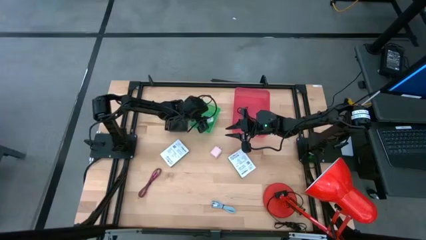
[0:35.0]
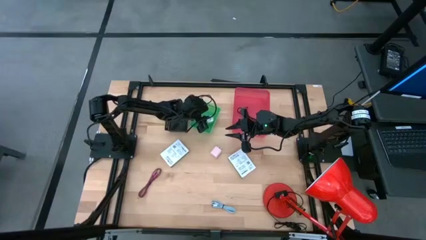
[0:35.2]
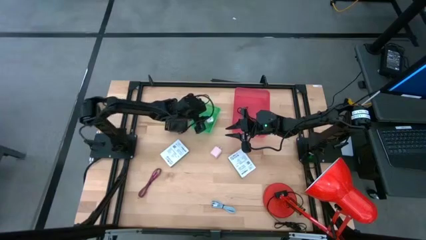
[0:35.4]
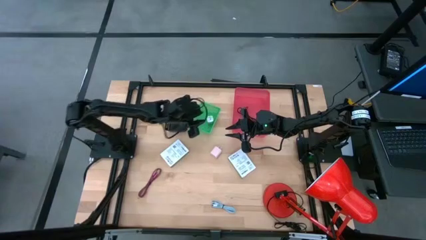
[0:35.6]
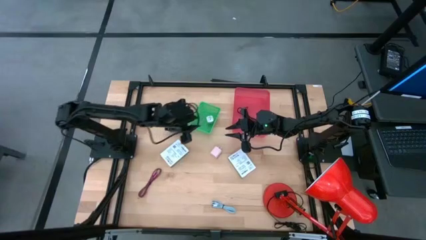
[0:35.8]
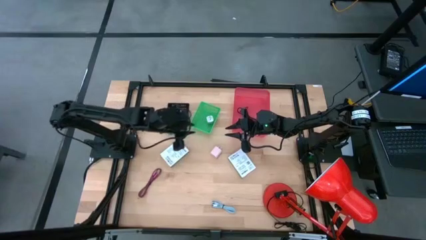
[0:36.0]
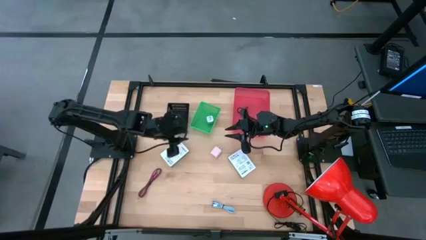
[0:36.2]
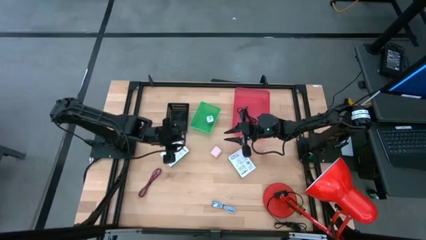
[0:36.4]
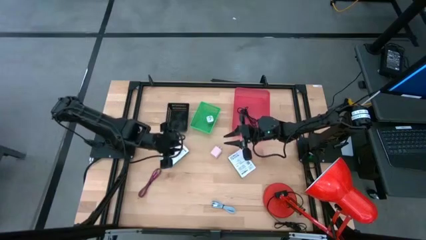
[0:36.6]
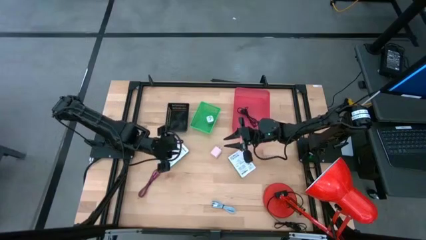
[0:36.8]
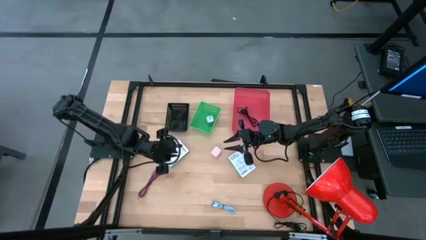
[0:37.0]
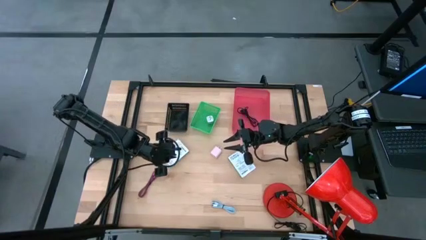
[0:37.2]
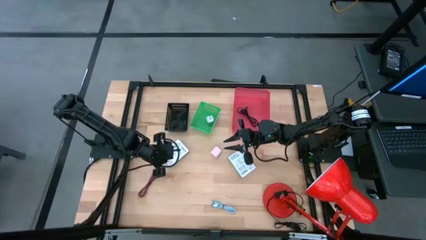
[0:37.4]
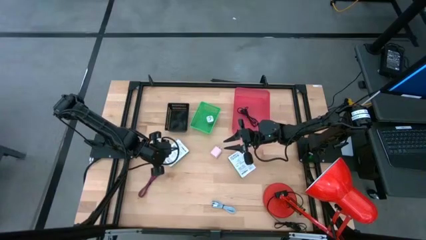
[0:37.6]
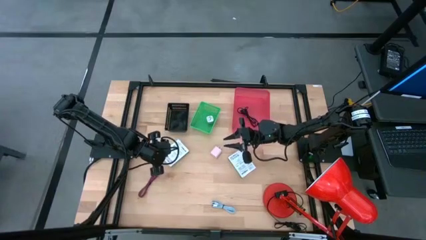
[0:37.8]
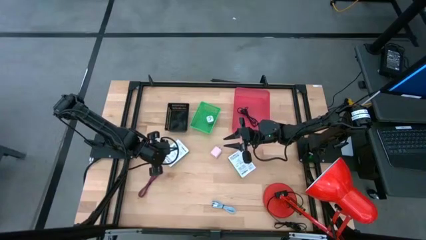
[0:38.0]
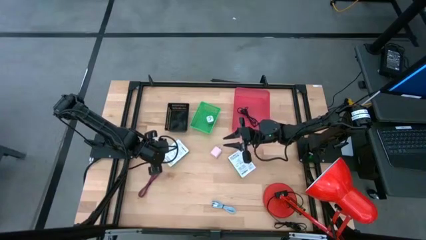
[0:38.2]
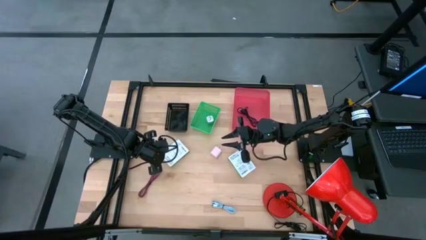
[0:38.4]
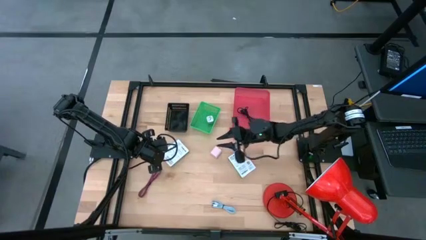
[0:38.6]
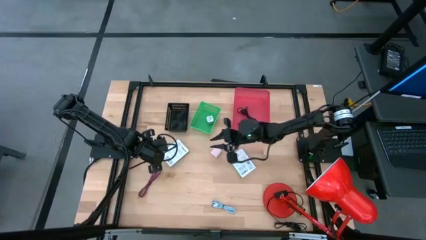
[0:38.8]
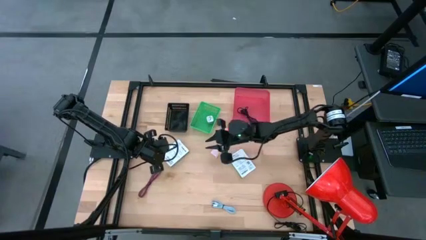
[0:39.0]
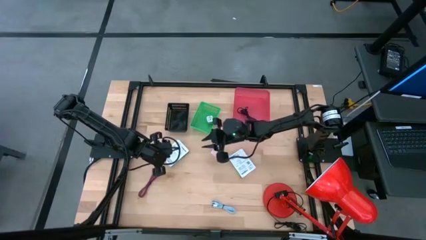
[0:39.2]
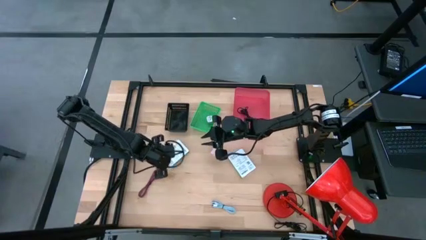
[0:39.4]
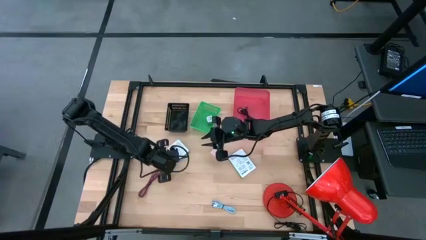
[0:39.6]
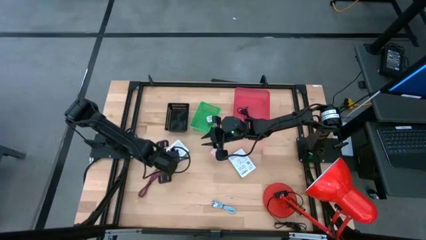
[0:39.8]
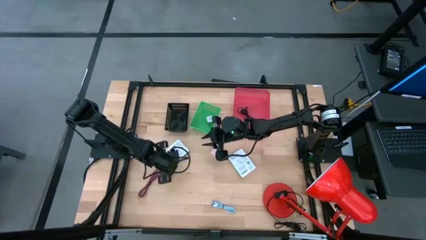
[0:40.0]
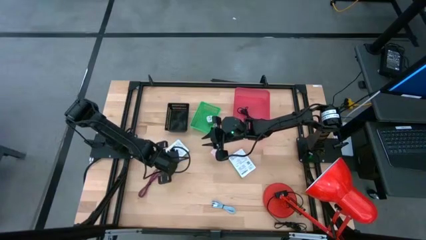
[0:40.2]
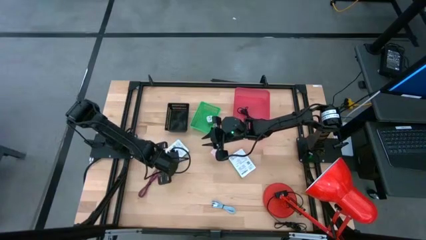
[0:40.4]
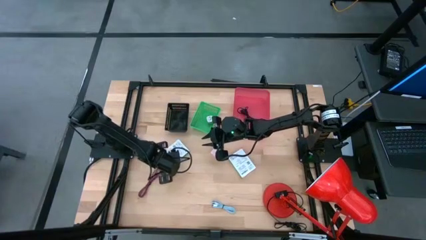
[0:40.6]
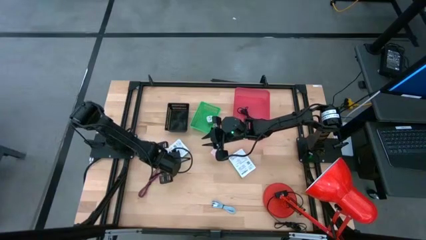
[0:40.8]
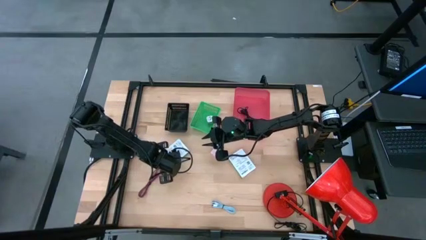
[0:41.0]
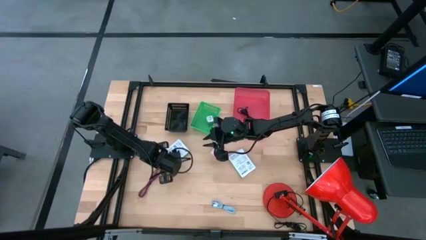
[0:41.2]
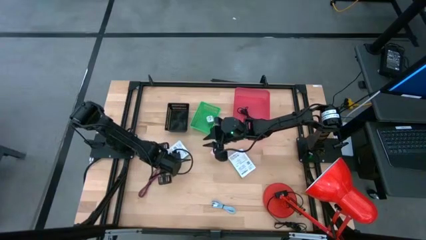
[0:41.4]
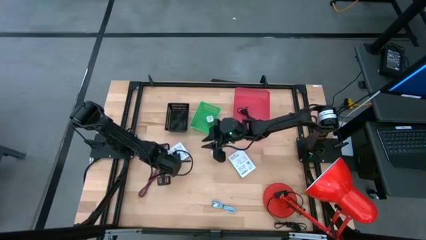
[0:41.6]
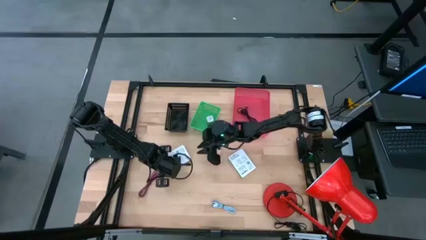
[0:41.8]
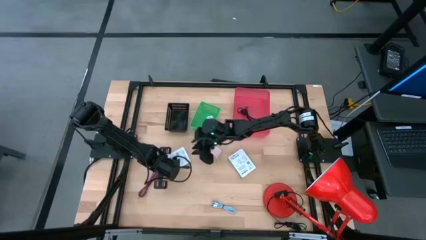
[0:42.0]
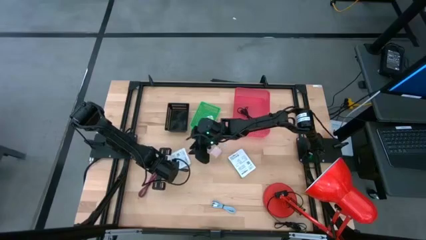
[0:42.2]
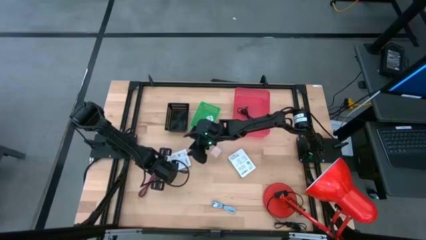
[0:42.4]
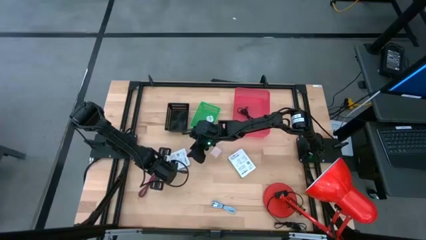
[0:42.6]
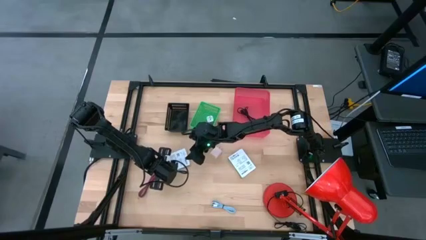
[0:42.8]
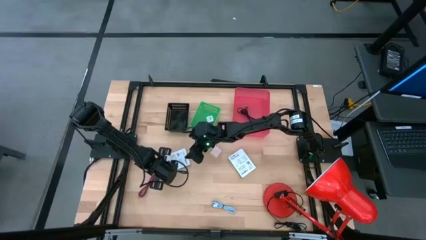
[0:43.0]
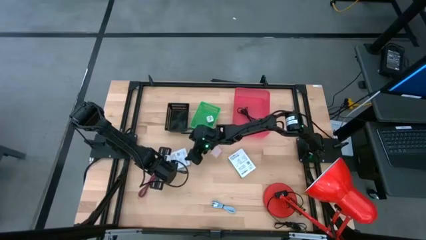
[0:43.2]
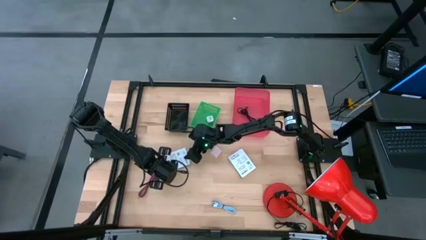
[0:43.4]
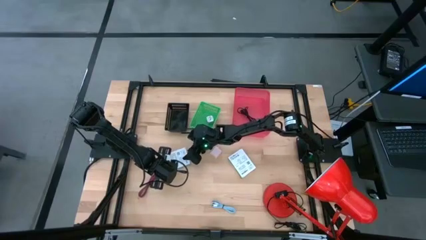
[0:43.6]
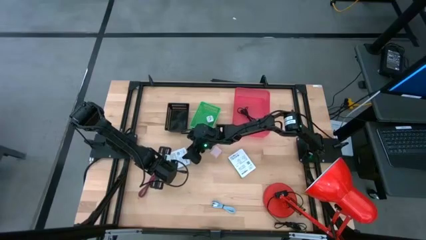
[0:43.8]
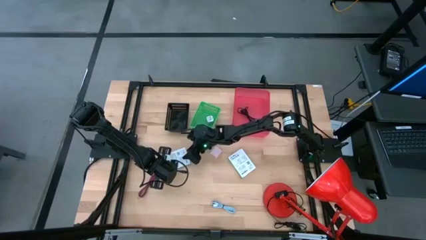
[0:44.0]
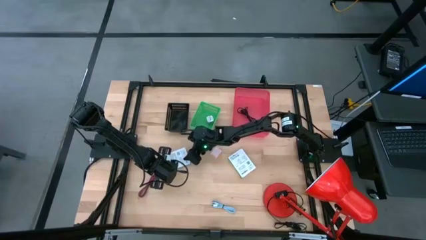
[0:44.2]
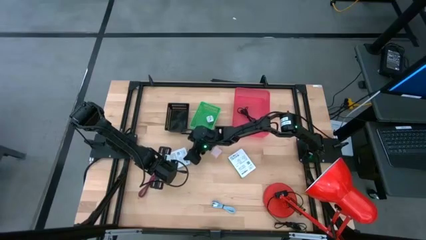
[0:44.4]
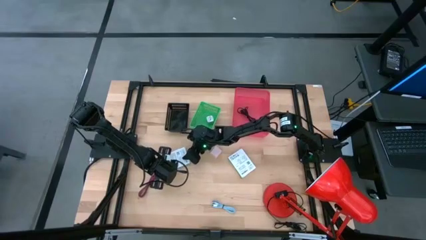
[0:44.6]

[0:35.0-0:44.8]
Task: Pick and place items into bin
Put the left white box into the black bin

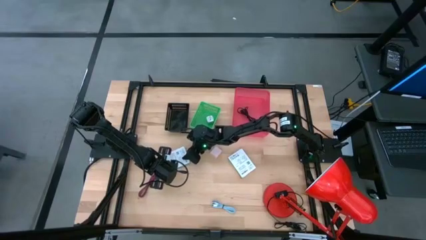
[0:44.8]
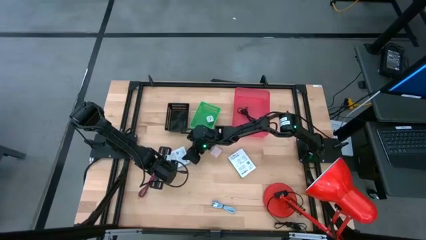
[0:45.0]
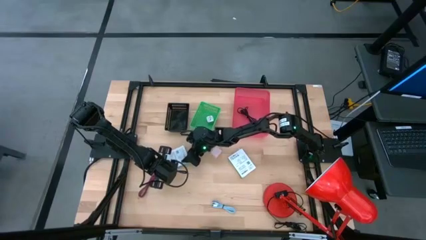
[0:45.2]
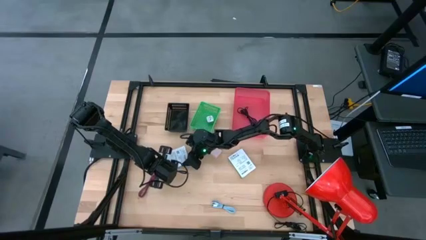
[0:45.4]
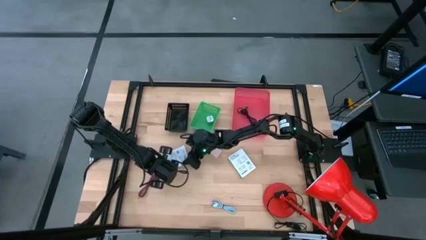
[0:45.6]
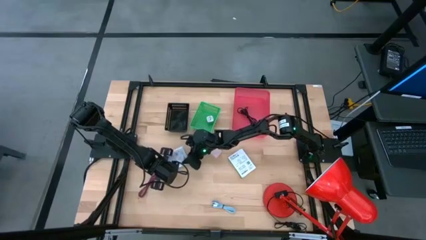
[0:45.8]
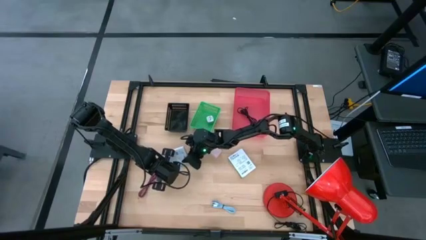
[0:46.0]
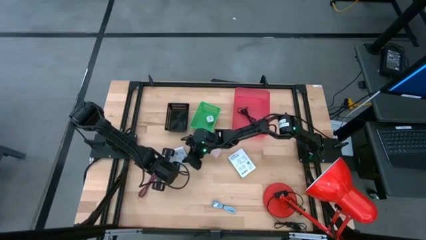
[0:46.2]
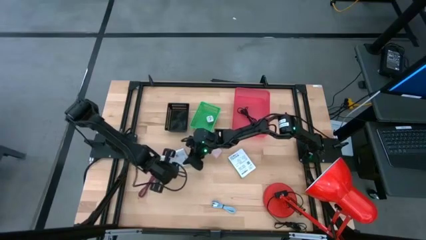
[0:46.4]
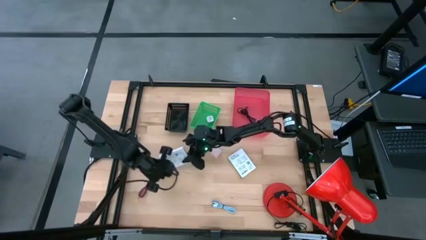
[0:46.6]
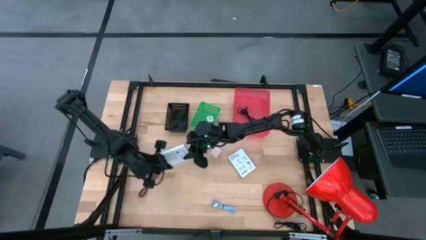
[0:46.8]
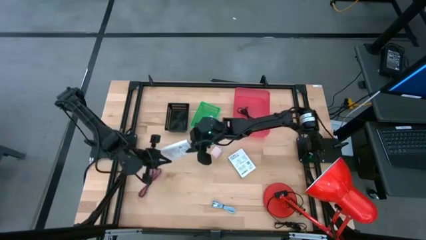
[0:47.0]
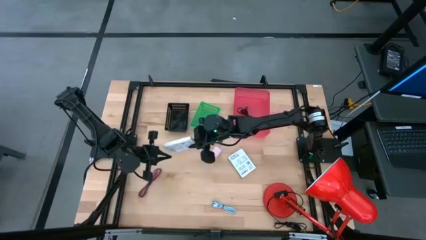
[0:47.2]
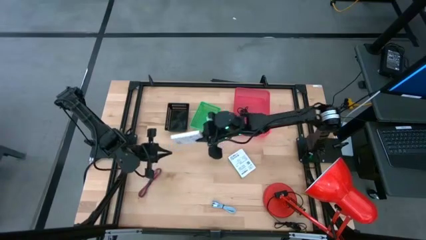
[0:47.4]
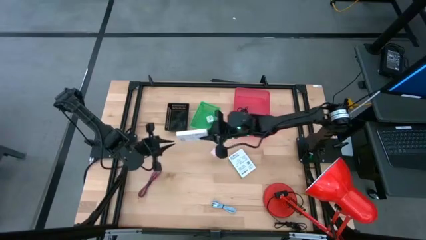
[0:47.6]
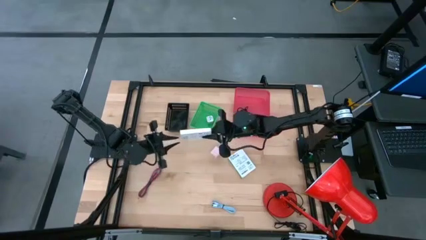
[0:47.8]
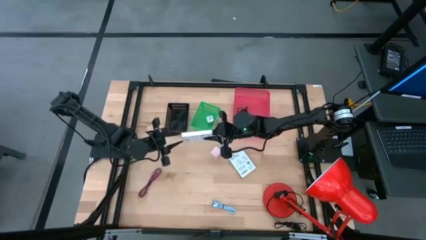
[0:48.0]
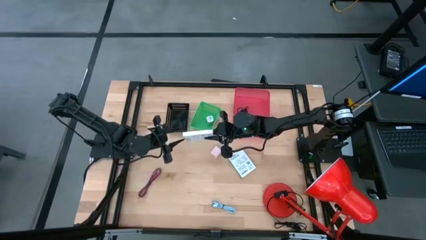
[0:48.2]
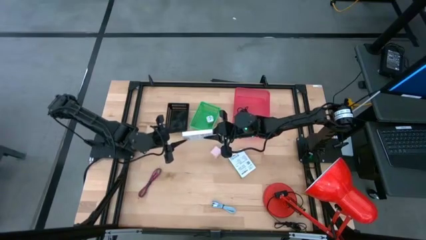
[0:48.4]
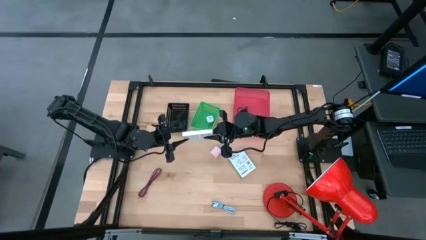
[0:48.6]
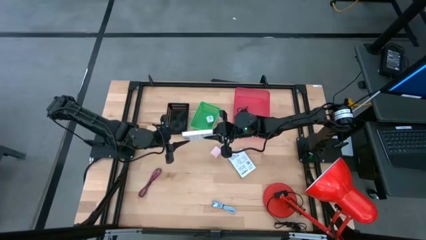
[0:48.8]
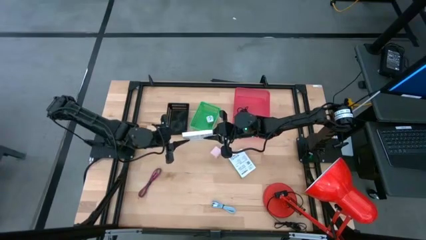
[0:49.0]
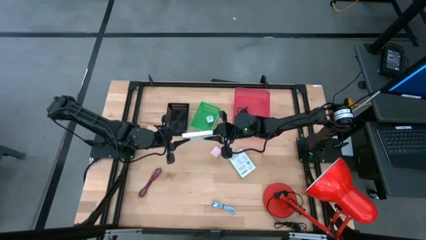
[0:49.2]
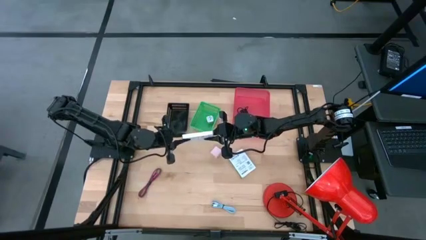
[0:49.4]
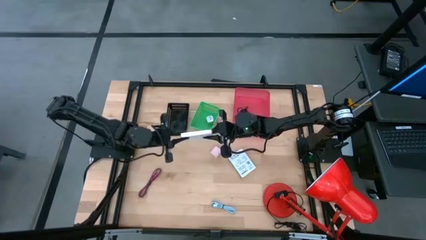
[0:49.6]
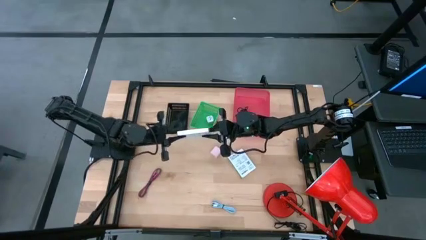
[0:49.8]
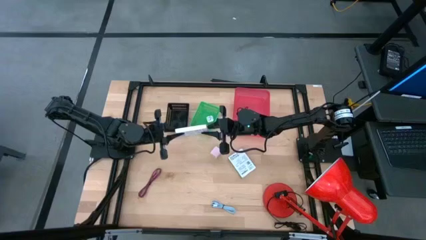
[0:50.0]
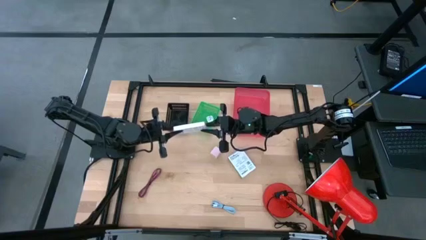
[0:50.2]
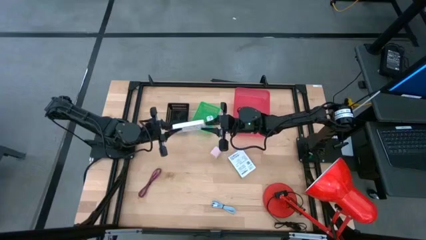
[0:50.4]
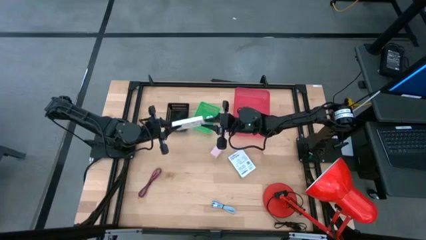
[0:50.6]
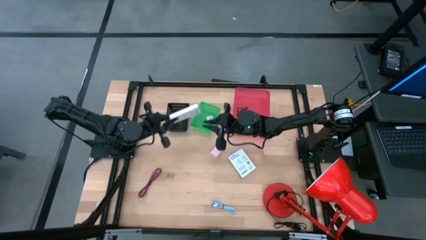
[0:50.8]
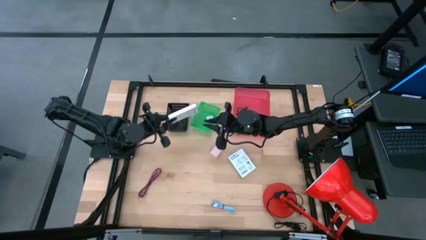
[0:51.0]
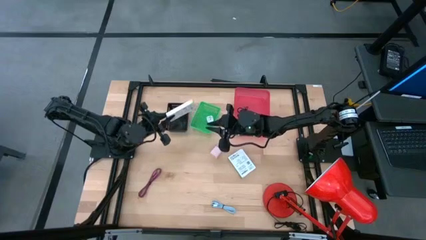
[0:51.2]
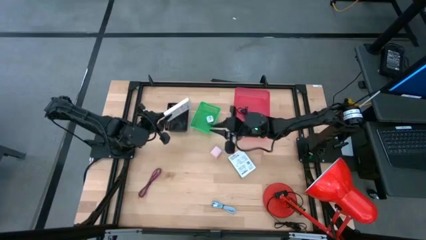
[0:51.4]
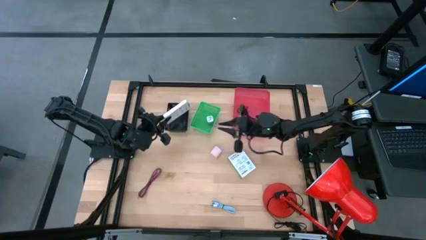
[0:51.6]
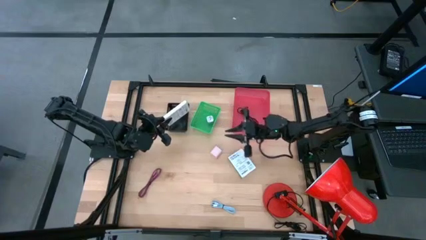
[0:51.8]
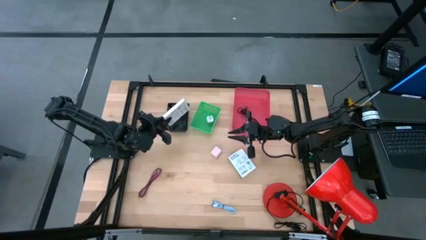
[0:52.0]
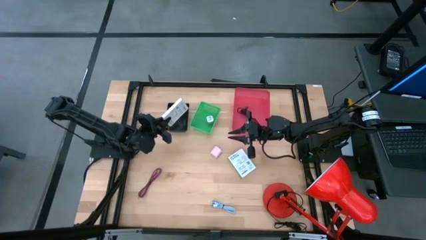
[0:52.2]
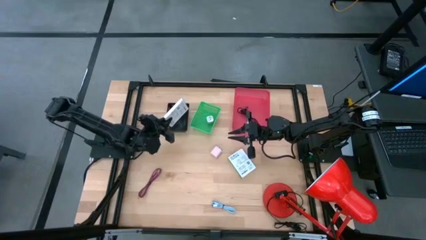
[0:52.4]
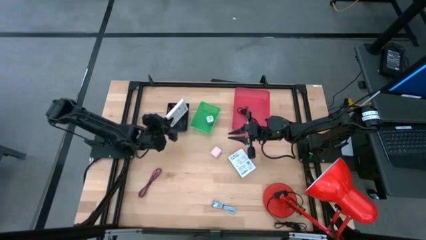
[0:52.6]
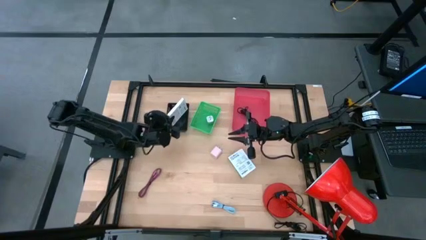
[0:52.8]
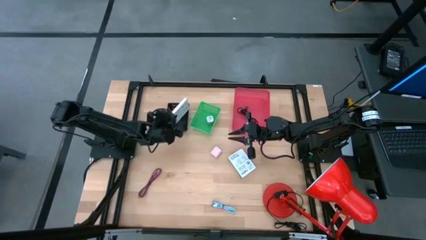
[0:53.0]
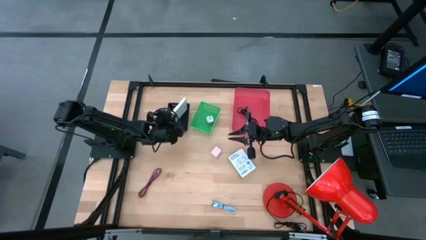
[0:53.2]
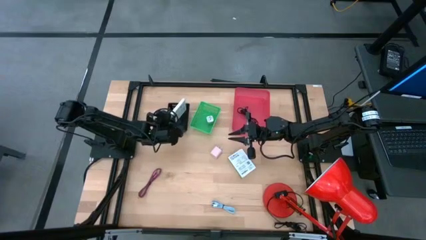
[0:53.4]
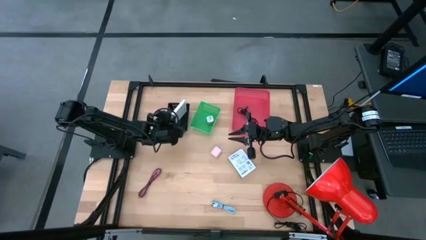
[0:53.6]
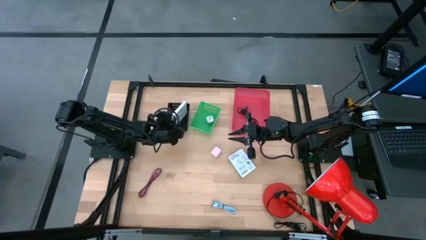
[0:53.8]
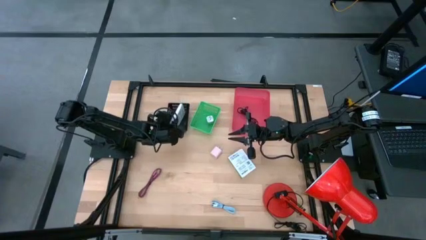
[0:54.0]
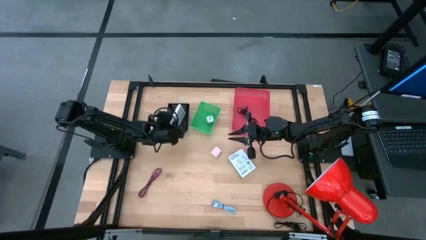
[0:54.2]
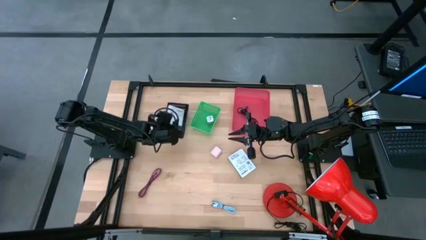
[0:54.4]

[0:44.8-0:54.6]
Put the left white box into the black bin
